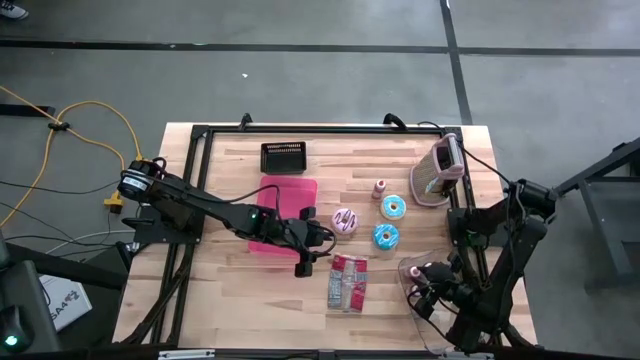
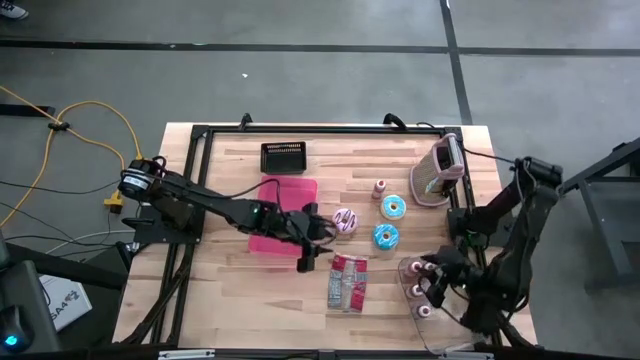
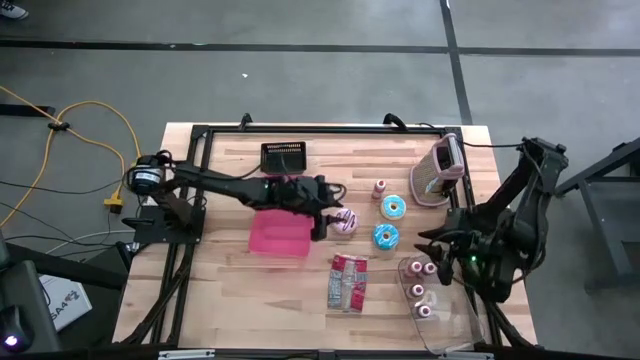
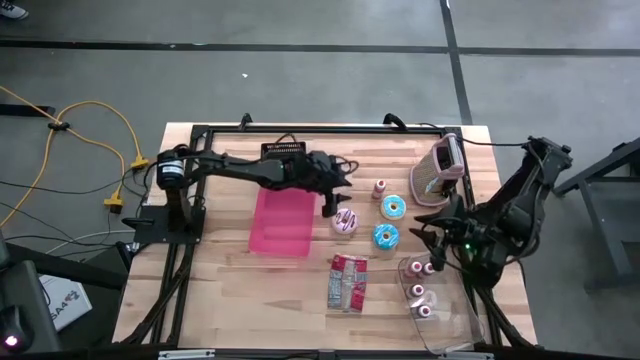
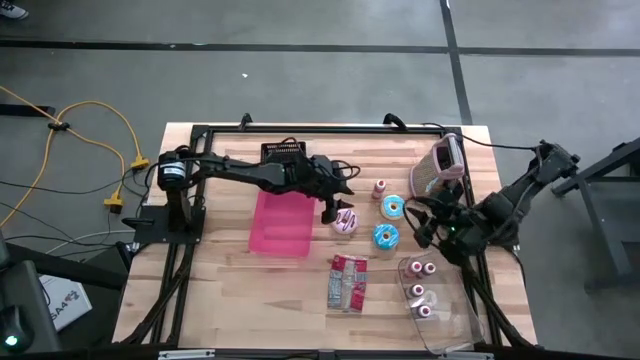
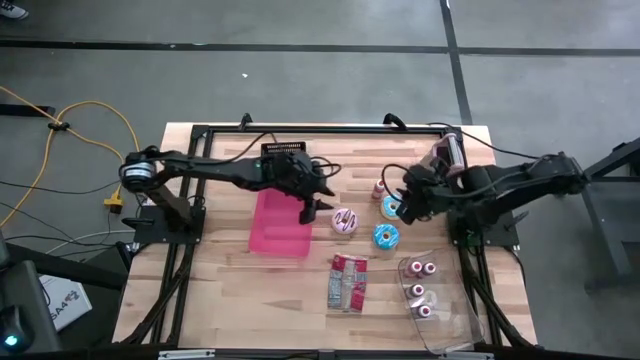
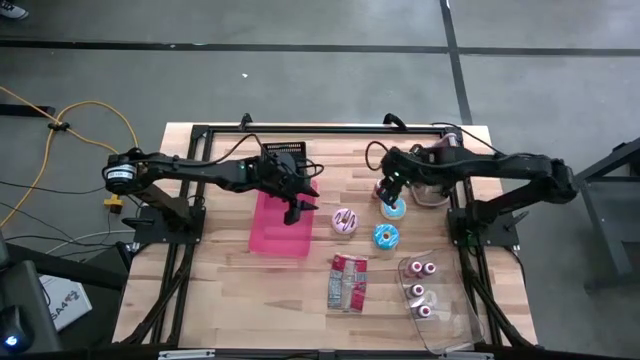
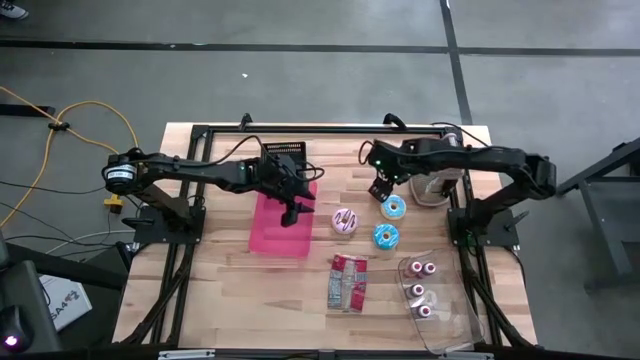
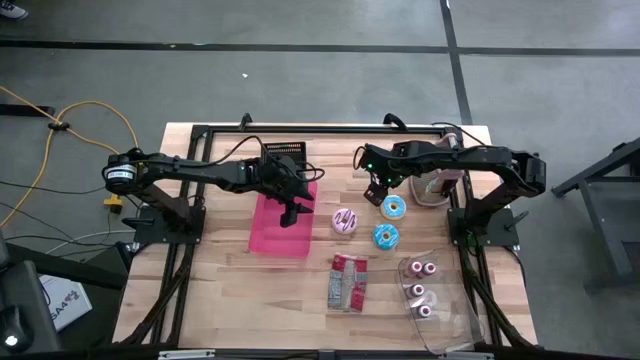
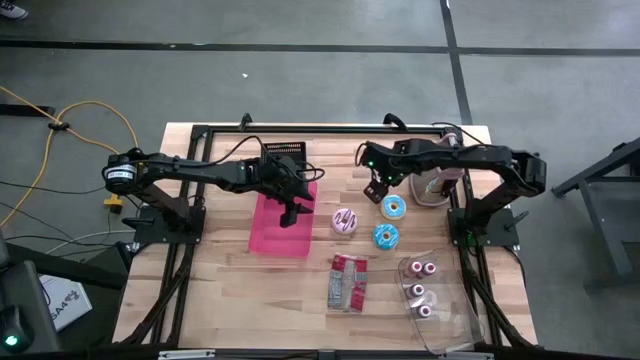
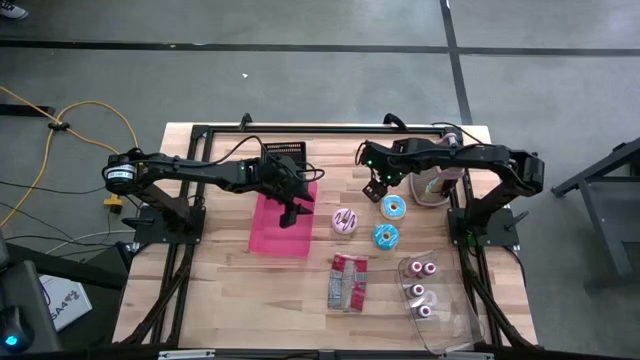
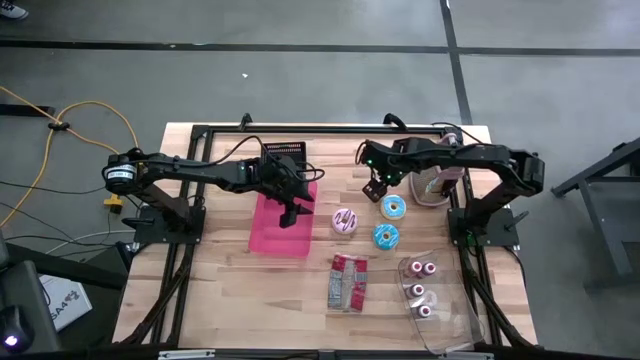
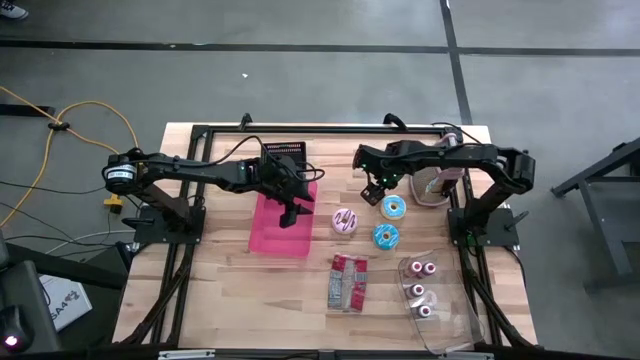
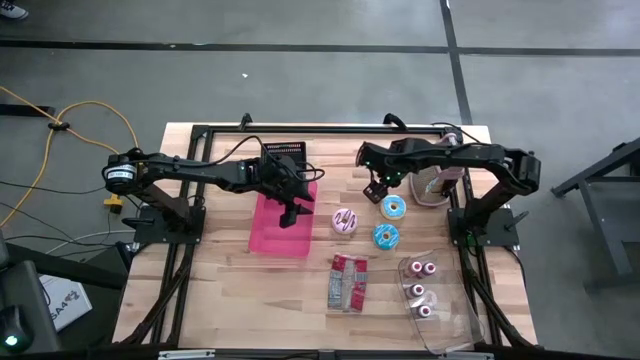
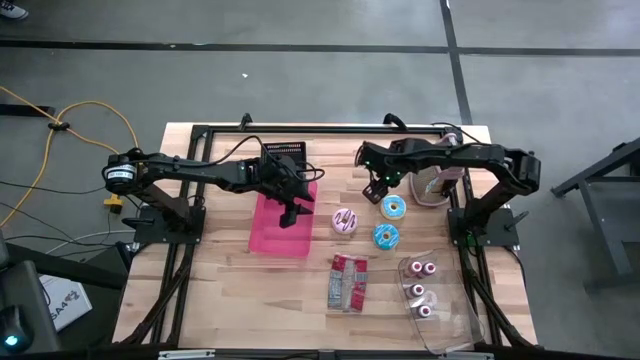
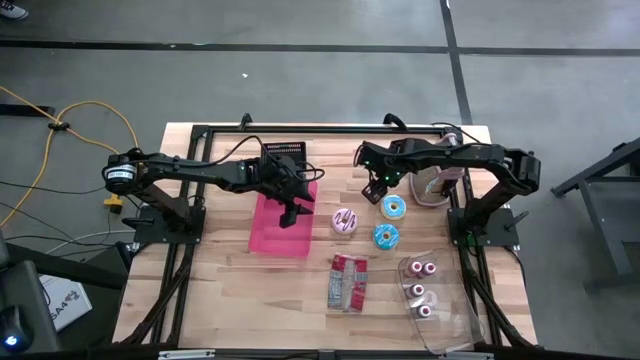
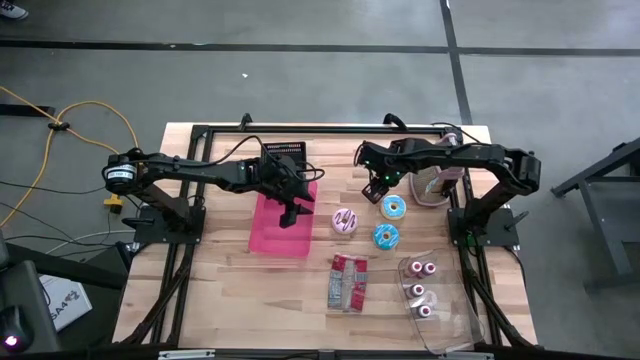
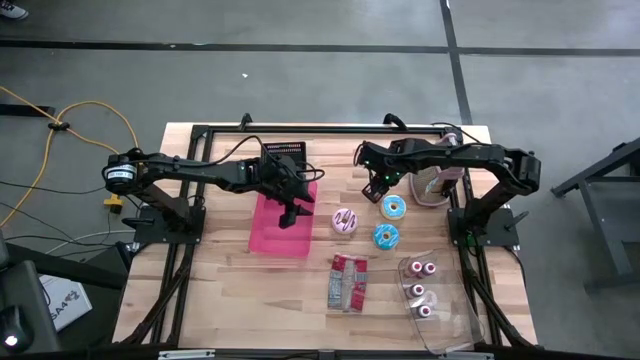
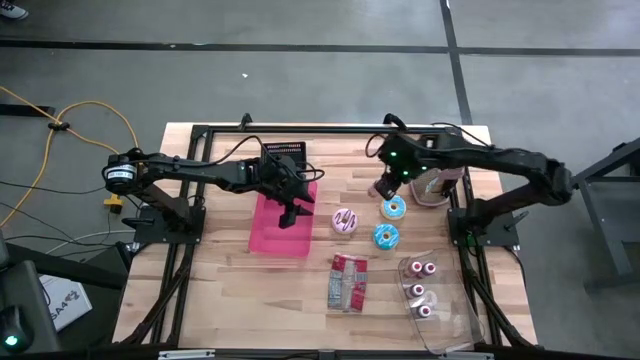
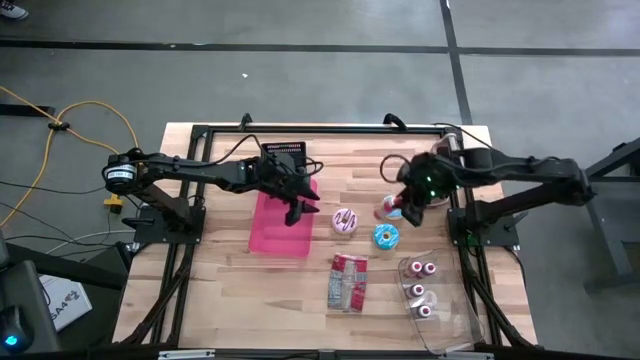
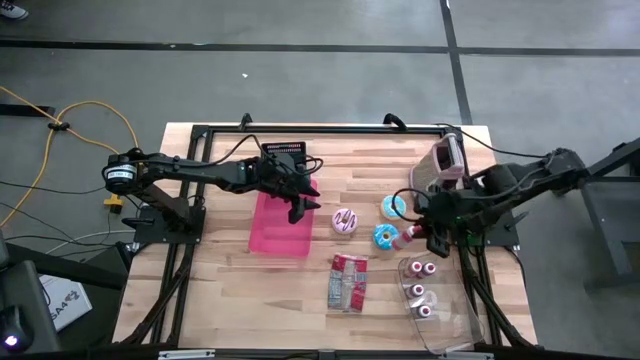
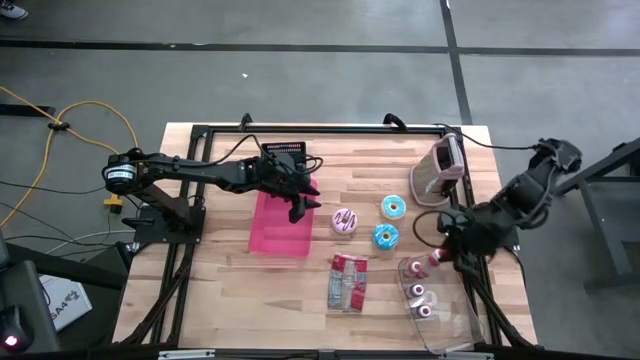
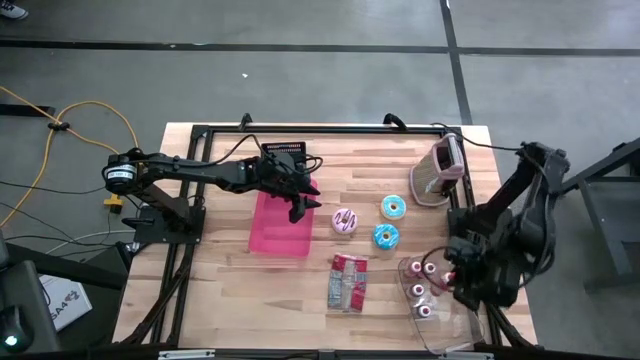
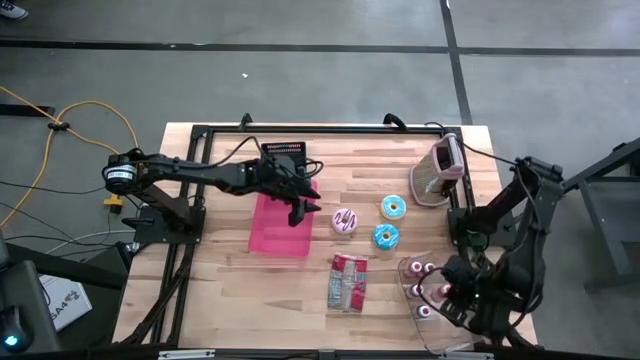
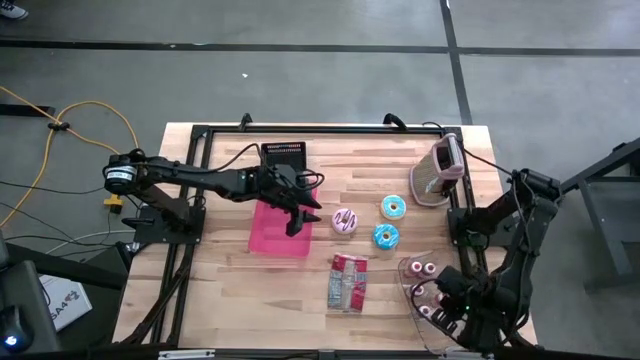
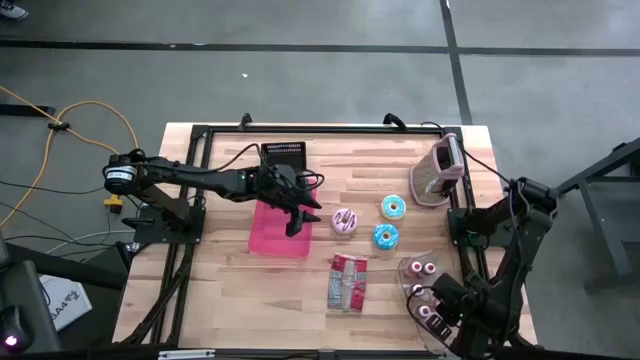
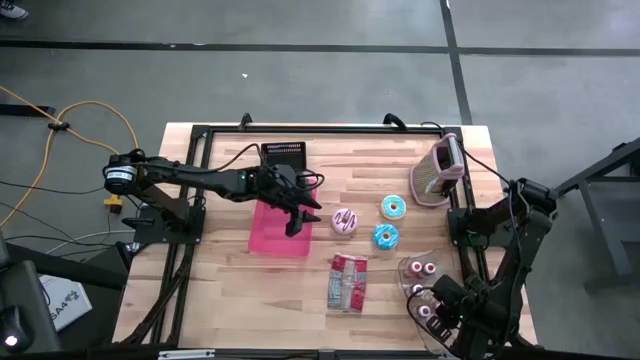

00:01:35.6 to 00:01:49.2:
Put the orange food coloring bottle into the transparent bin

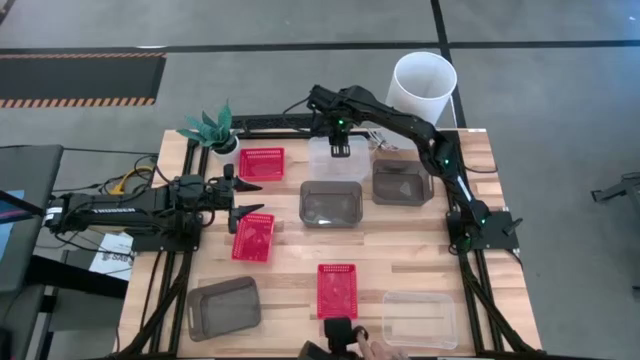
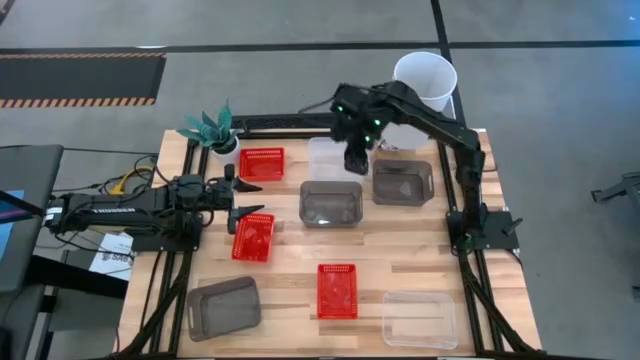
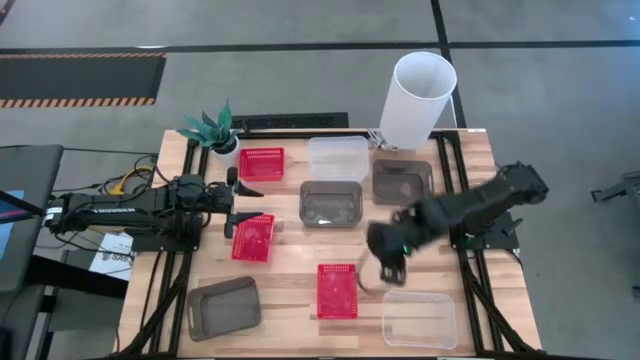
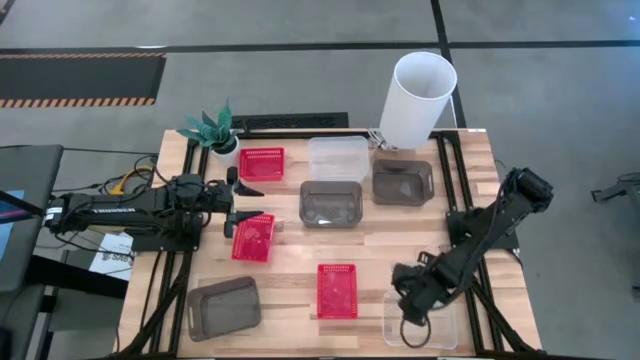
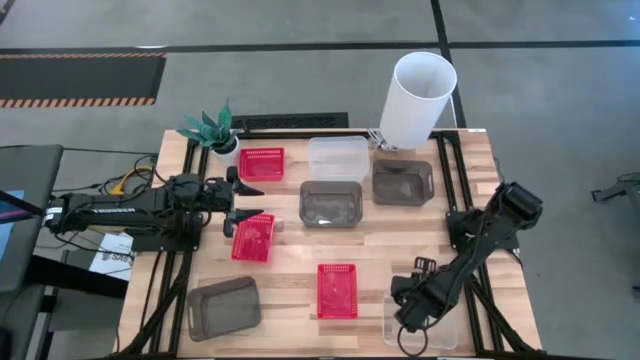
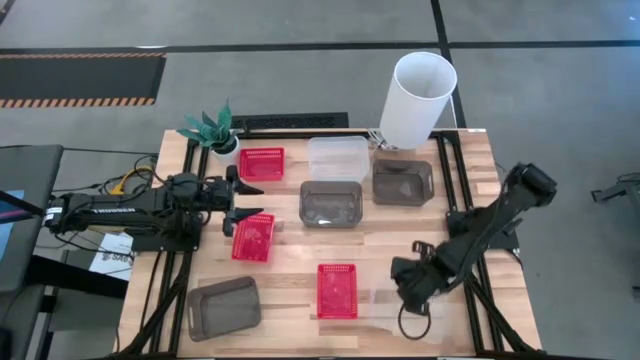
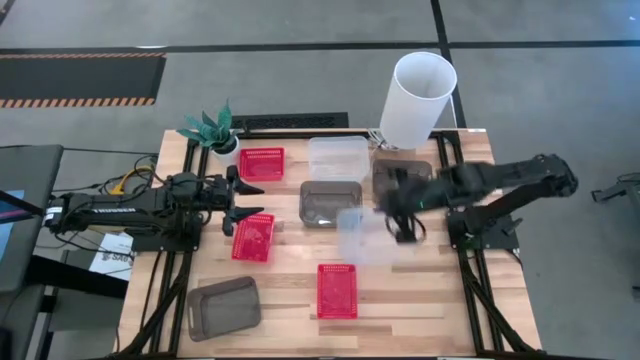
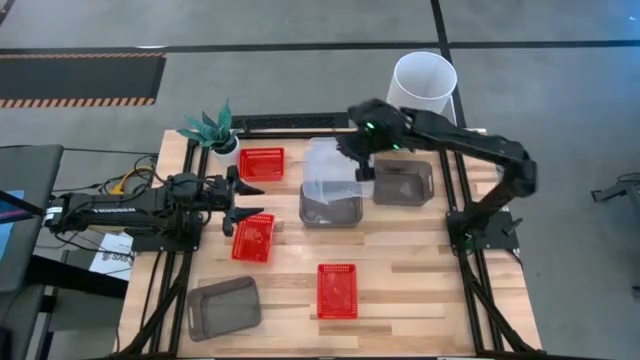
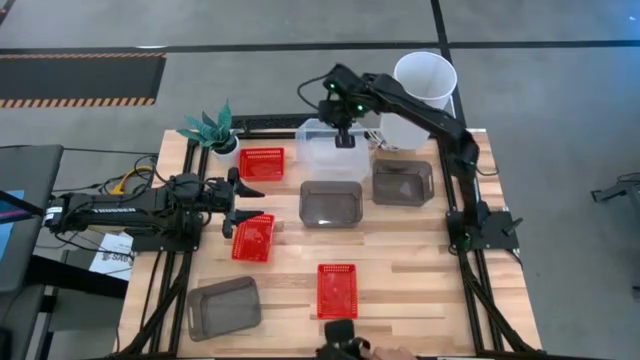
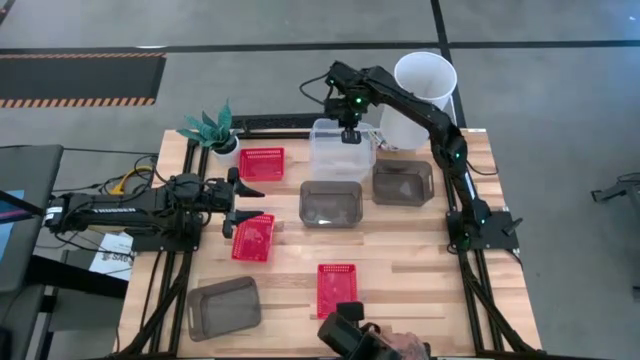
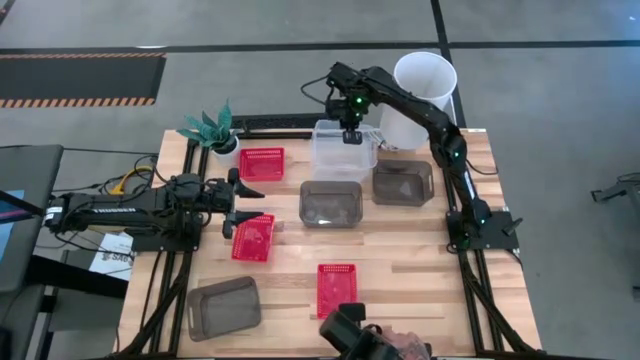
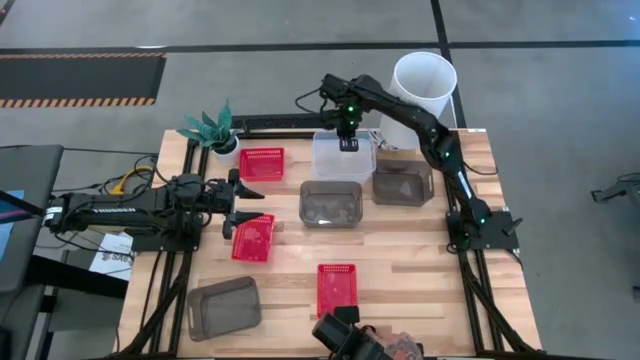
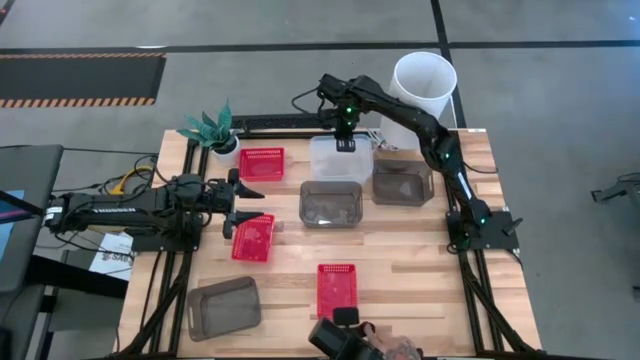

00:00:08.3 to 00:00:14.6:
Stack the transparent bin on top of the transparent bins
